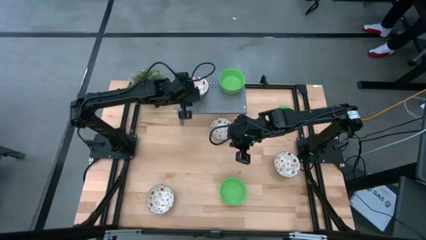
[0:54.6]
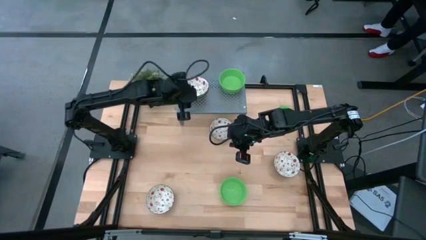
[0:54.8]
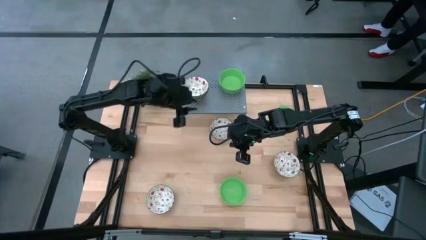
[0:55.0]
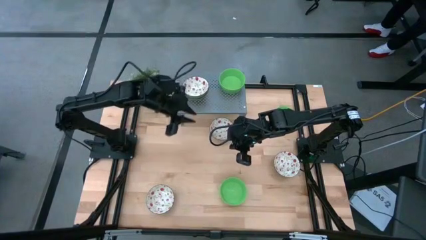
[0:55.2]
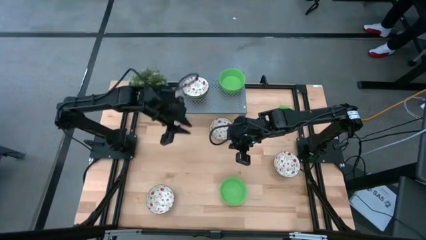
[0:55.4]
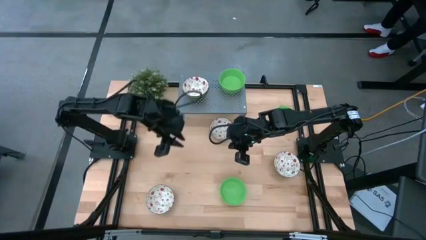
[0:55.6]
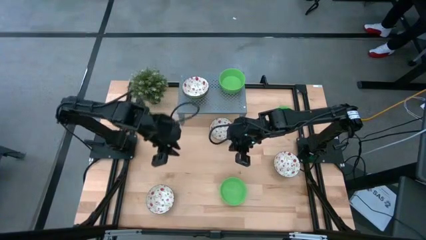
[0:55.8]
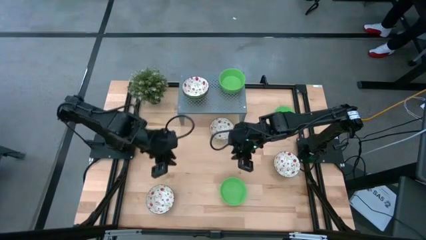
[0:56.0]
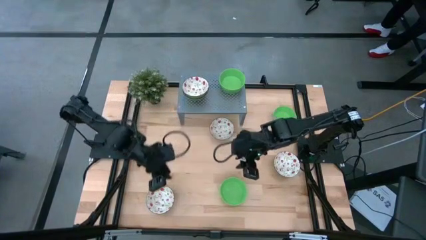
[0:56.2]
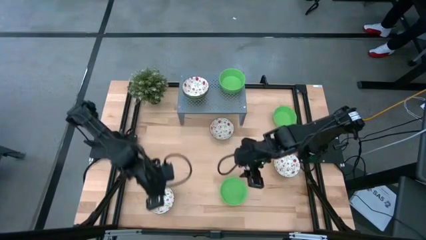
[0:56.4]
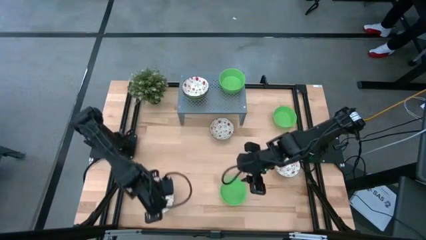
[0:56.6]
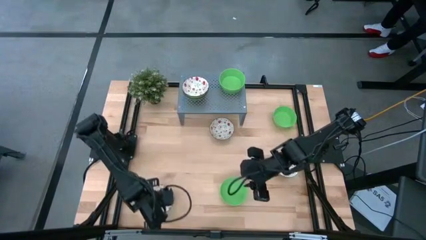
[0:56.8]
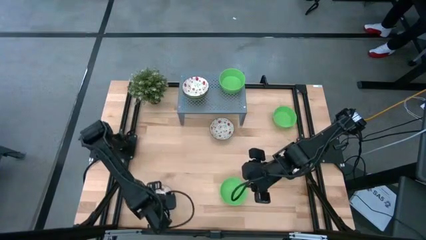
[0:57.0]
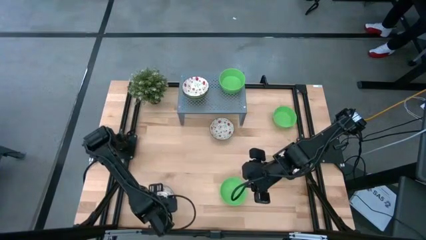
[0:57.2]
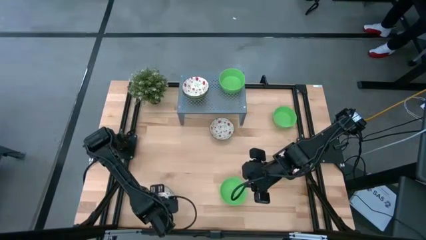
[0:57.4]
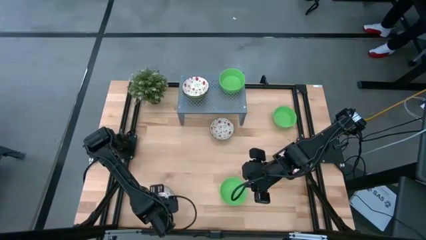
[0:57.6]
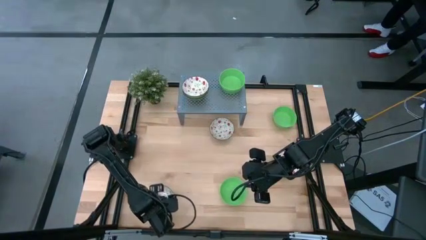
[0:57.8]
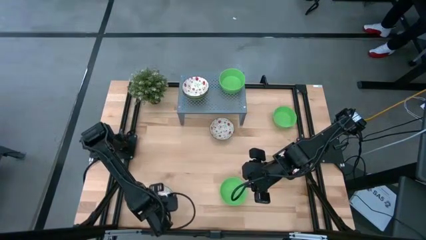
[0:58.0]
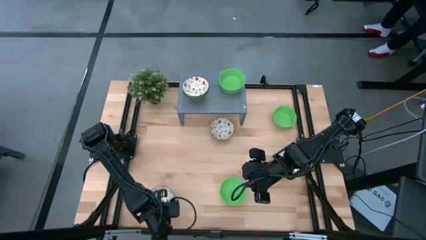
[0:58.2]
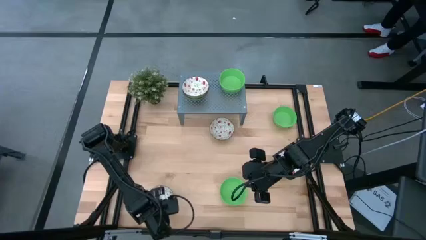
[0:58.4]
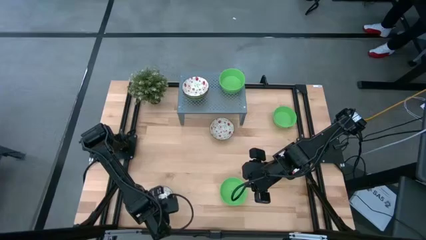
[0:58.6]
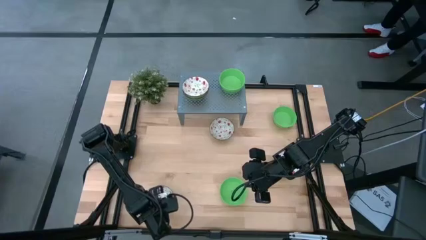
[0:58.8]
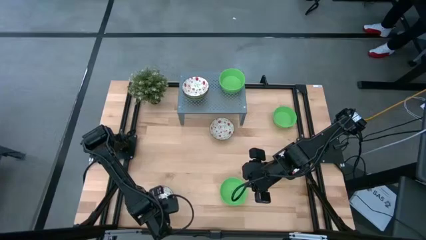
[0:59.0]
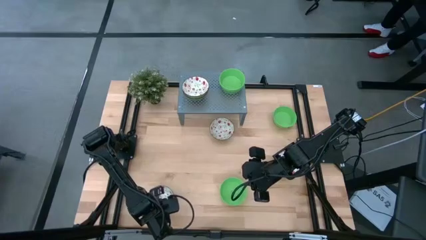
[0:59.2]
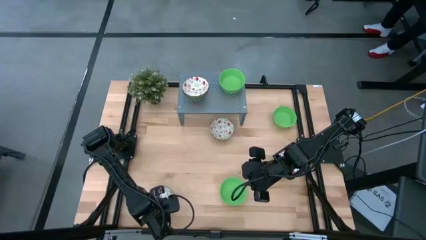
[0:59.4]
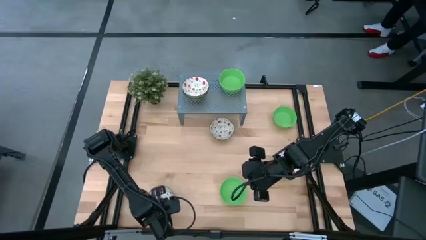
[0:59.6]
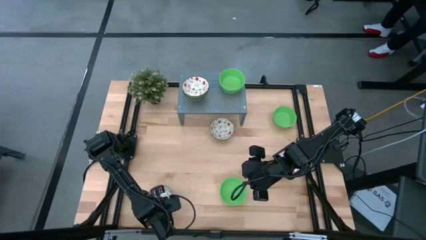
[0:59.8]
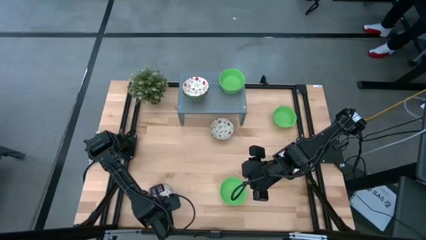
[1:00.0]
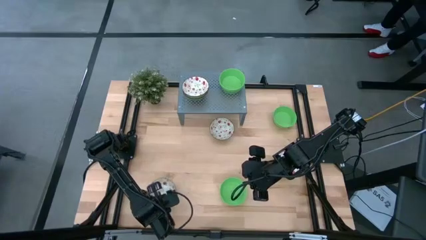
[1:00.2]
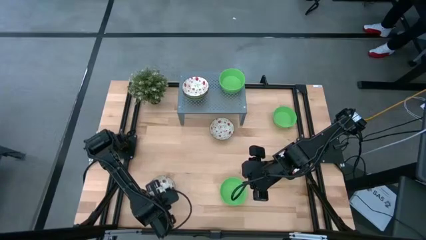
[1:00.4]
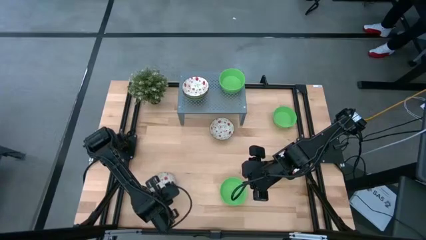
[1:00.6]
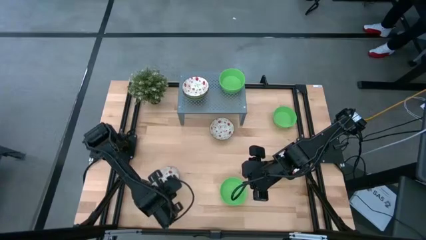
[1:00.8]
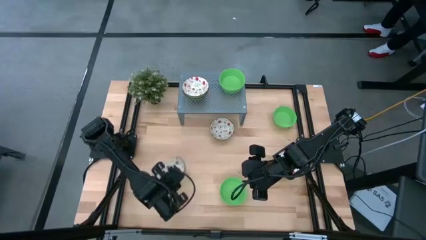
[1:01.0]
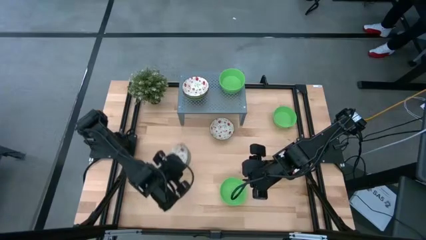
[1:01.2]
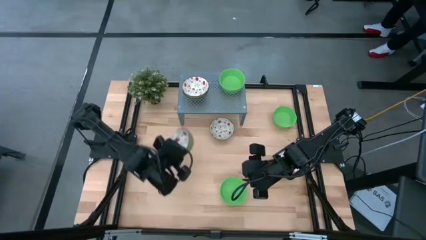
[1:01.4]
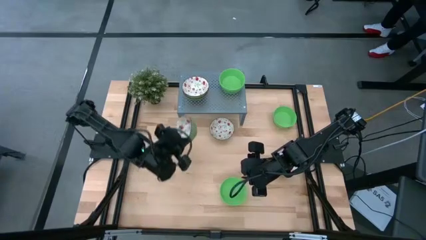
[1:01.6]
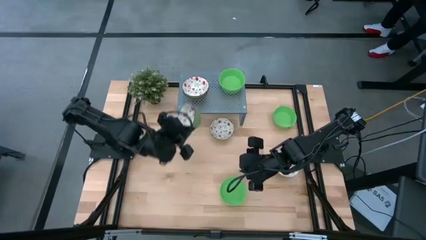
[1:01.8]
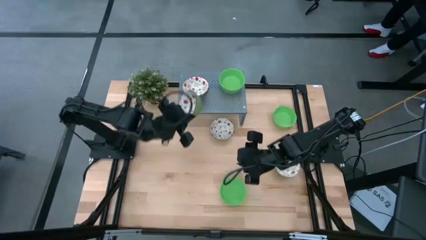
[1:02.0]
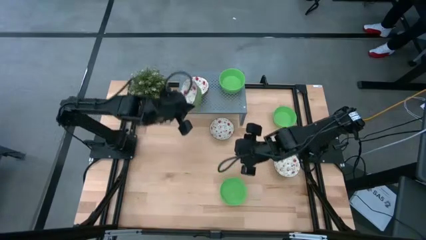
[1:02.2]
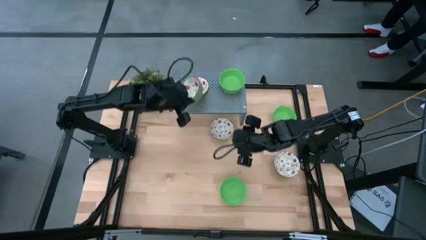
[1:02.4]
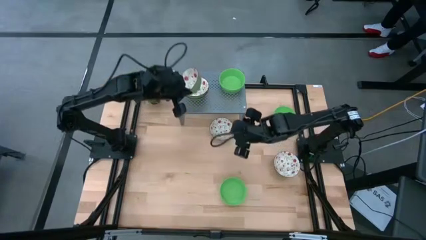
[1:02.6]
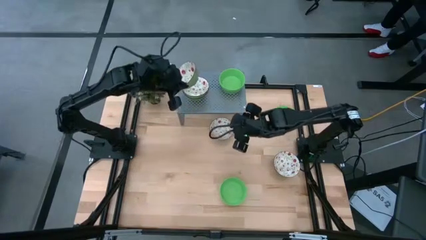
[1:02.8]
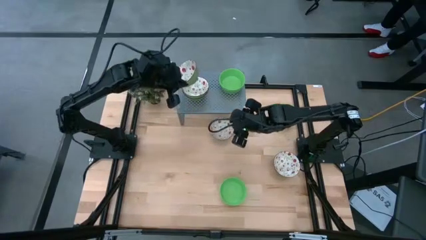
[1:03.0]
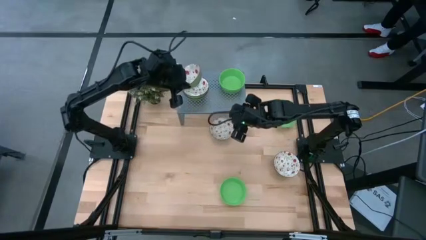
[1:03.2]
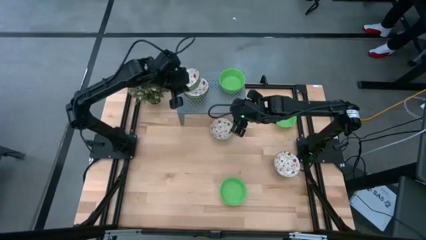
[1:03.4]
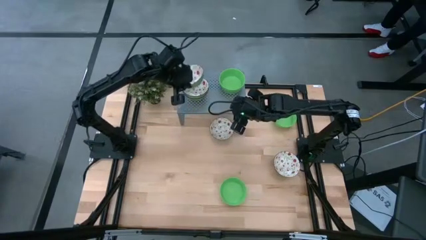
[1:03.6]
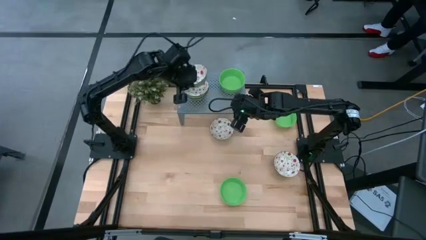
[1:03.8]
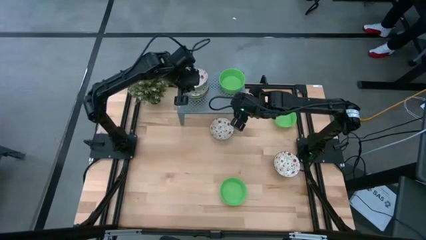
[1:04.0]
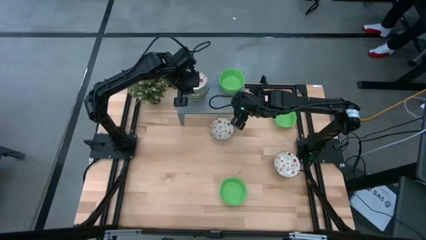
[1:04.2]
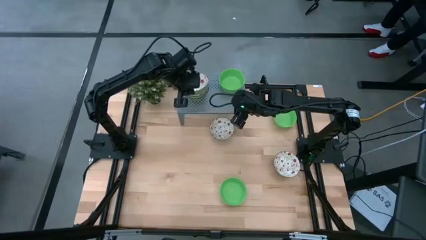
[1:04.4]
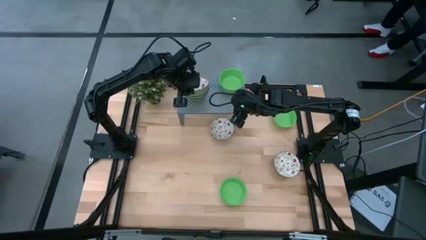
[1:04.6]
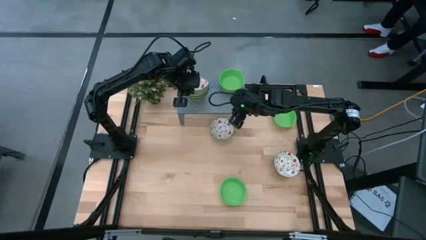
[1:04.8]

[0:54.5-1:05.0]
Task: Pick & Place Mini bowls
Stack the green patterned bowl on the green patterned bowl

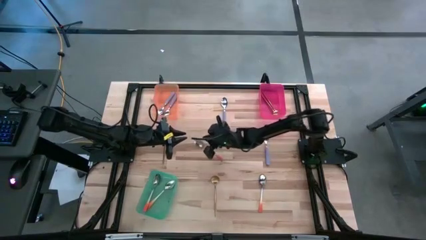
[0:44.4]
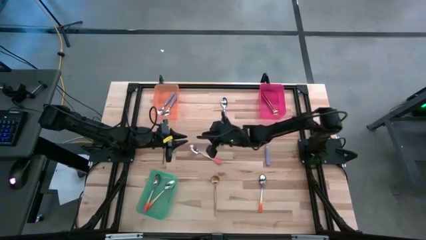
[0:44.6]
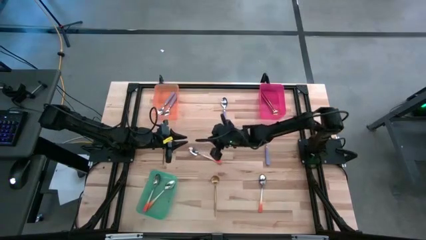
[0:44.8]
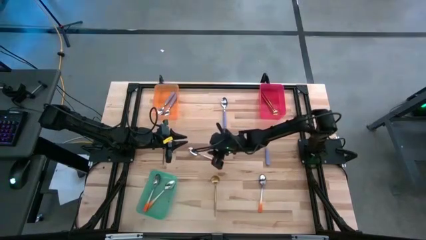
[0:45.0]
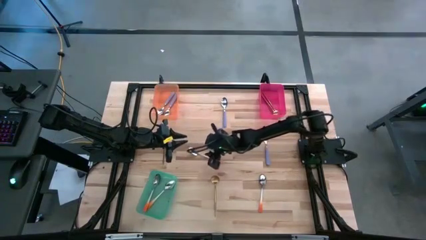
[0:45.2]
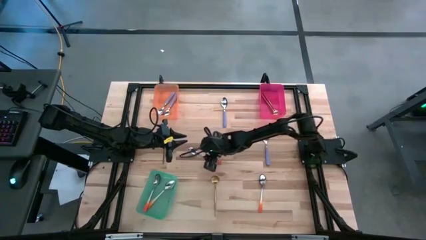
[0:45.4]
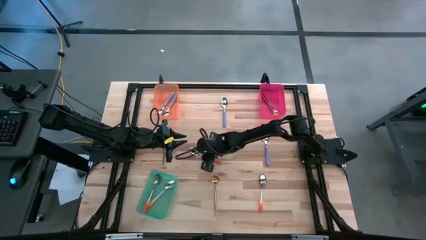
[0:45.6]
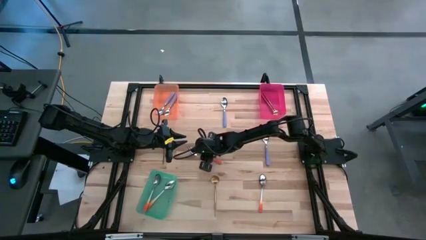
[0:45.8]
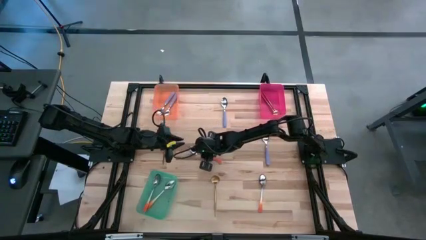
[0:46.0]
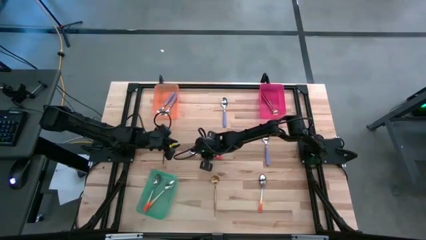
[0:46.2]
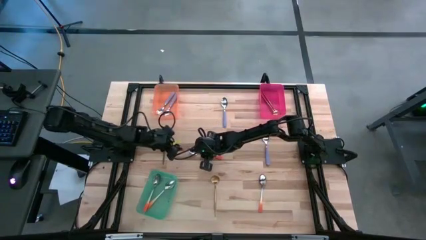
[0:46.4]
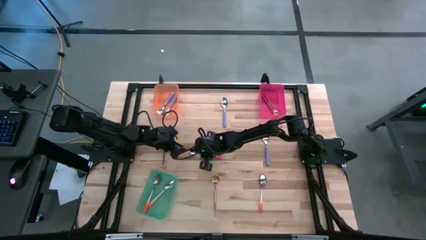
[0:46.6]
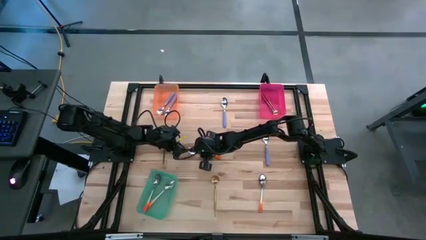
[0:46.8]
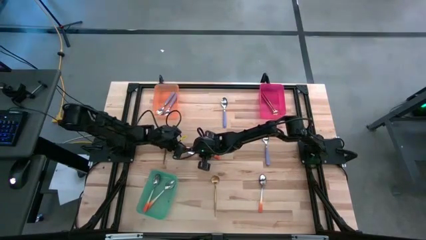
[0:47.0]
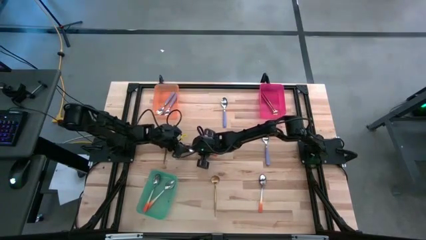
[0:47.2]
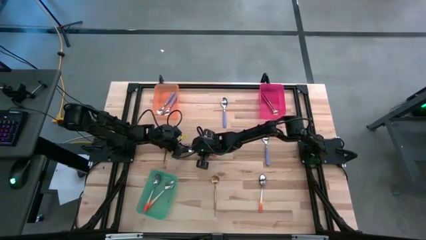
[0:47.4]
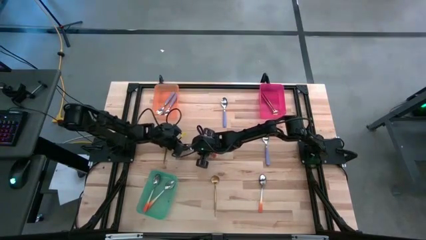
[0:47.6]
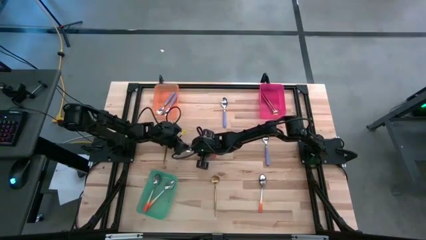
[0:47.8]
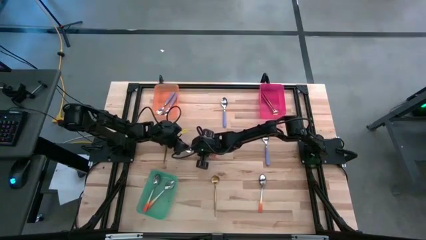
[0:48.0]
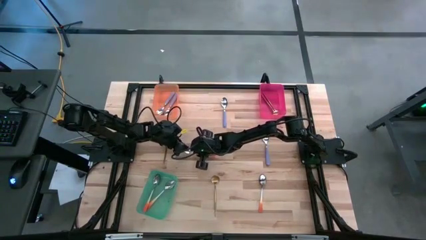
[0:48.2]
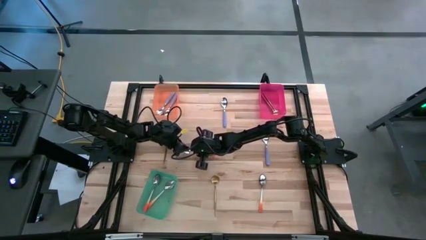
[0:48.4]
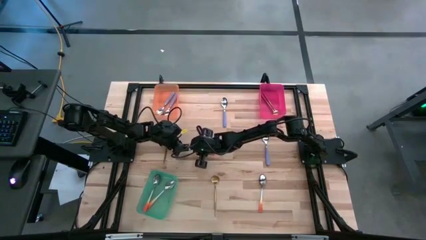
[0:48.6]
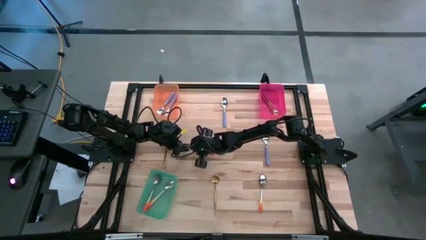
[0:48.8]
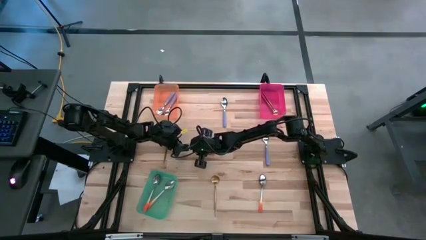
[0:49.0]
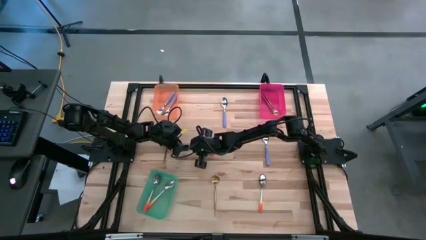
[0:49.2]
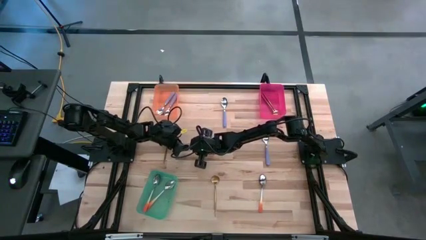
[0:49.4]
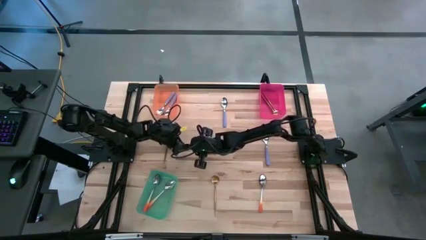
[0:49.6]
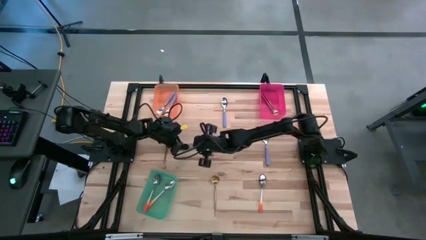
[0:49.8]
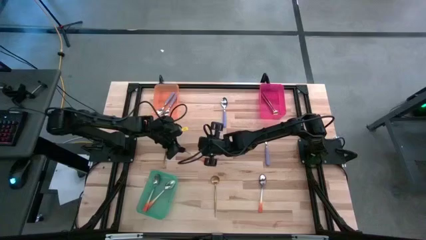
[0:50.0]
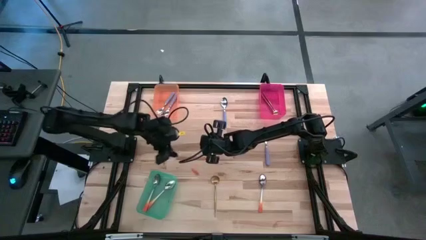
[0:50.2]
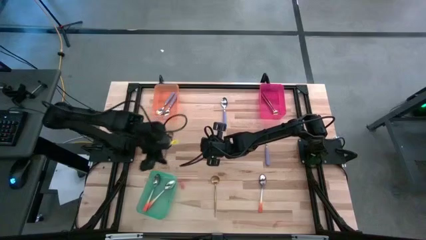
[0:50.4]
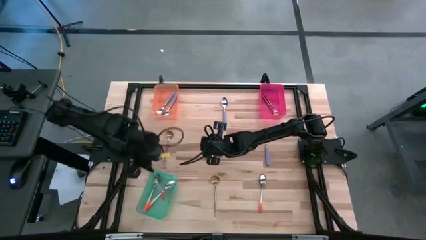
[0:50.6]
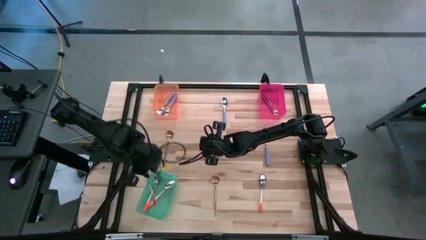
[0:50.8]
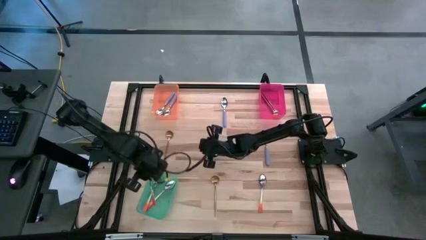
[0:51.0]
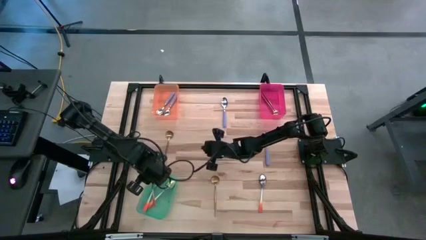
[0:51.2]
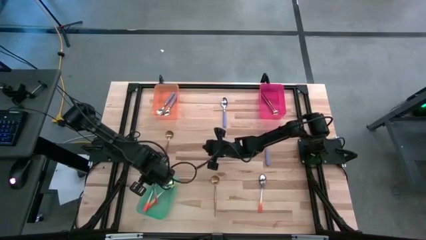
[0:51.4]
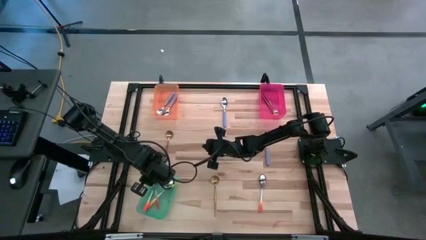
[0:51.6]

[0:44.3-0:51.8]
Task: Sort silverware by color (type)
Put the orange spoon into the green bin
